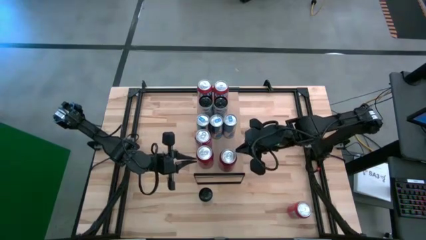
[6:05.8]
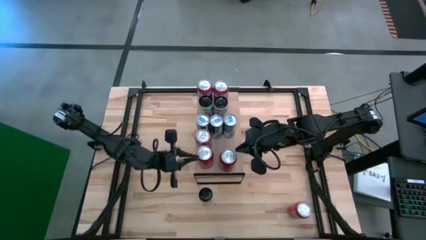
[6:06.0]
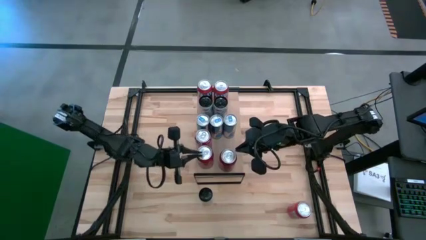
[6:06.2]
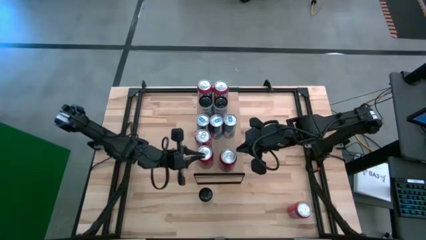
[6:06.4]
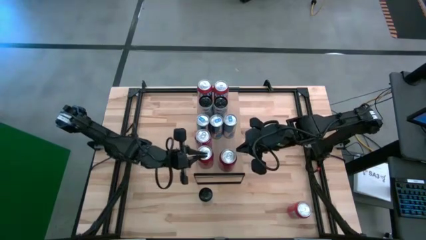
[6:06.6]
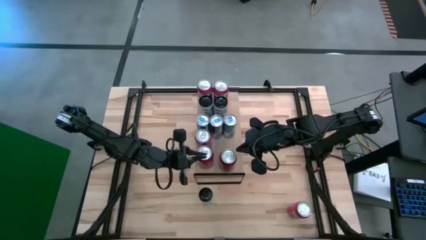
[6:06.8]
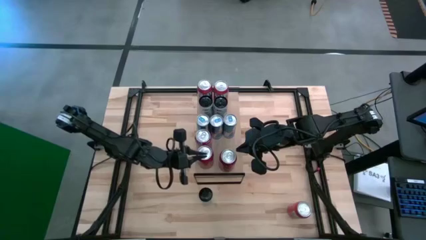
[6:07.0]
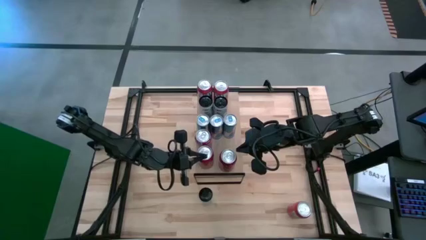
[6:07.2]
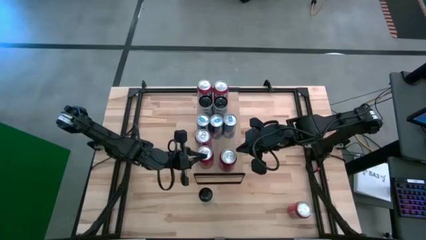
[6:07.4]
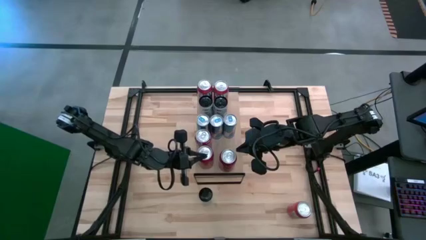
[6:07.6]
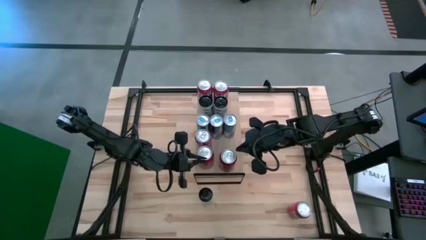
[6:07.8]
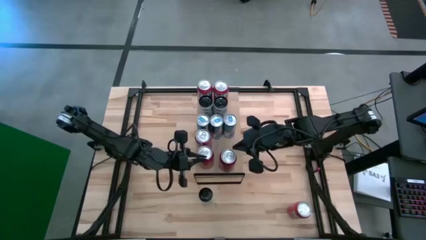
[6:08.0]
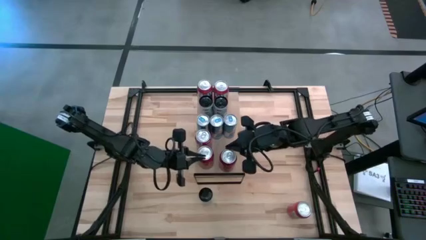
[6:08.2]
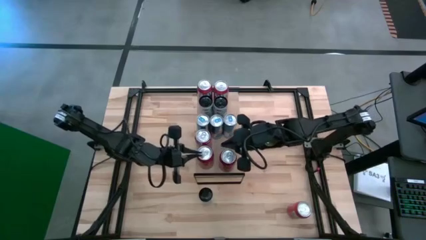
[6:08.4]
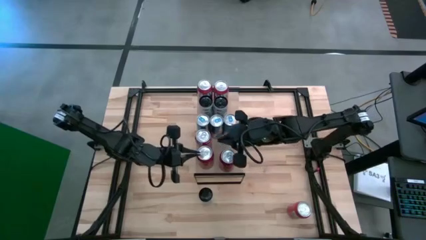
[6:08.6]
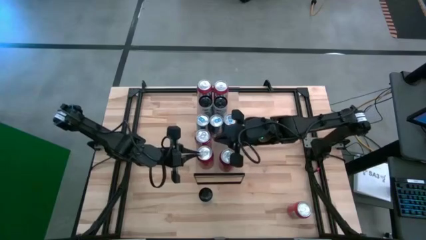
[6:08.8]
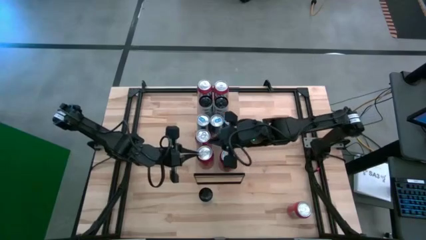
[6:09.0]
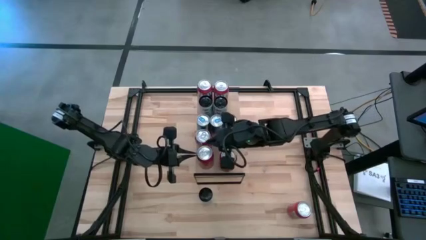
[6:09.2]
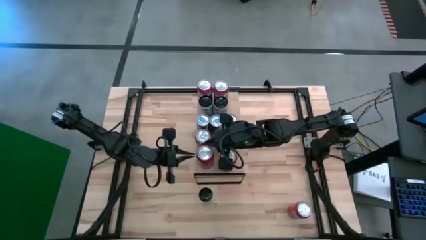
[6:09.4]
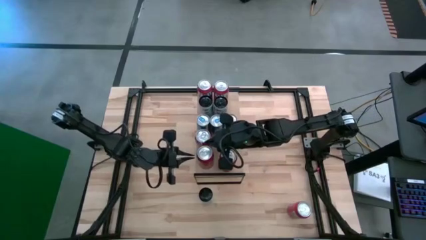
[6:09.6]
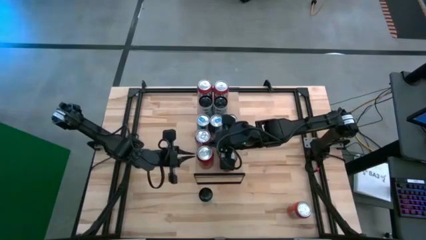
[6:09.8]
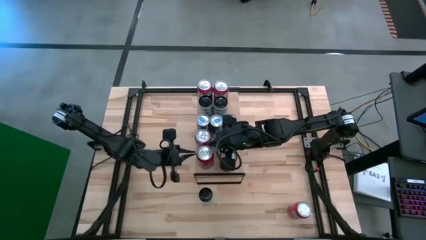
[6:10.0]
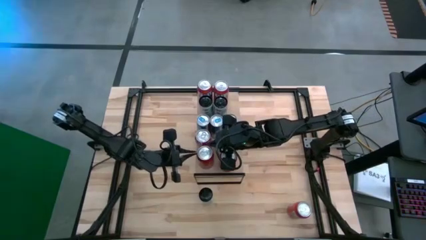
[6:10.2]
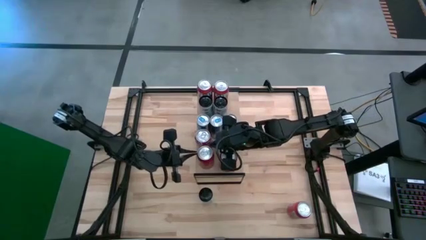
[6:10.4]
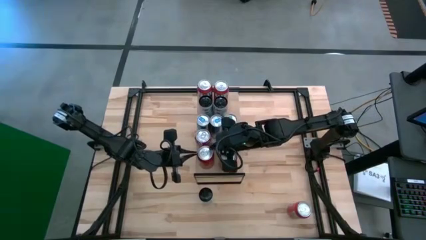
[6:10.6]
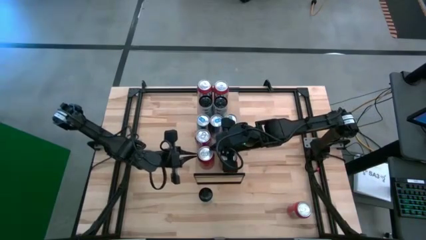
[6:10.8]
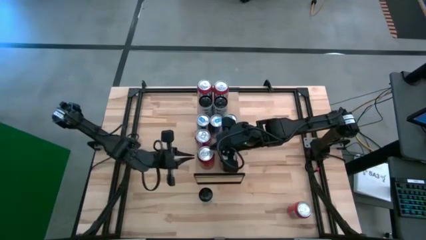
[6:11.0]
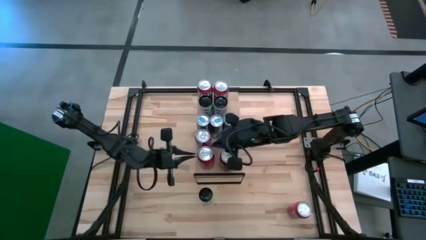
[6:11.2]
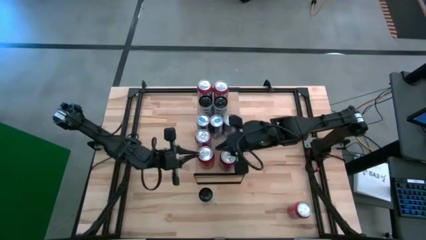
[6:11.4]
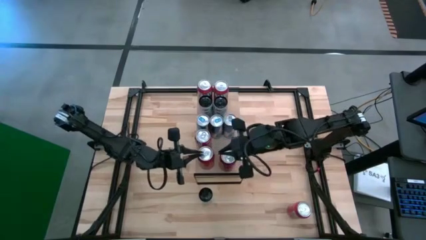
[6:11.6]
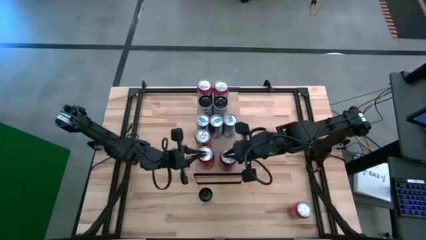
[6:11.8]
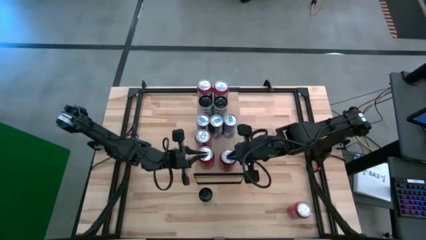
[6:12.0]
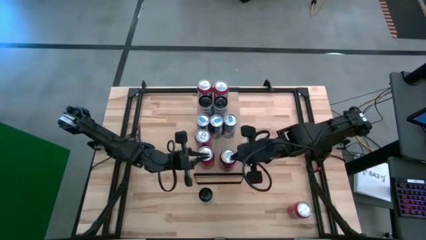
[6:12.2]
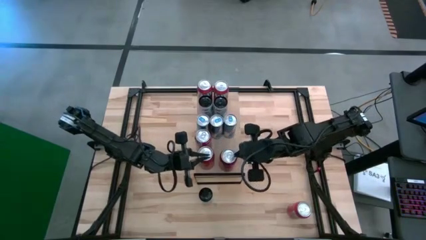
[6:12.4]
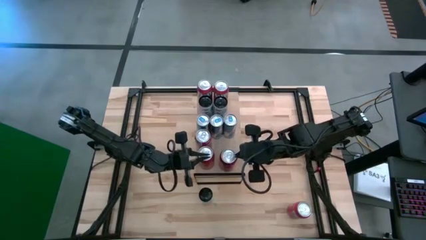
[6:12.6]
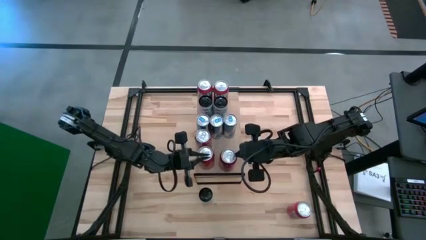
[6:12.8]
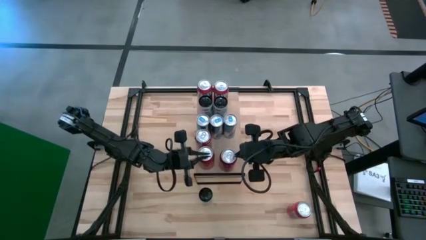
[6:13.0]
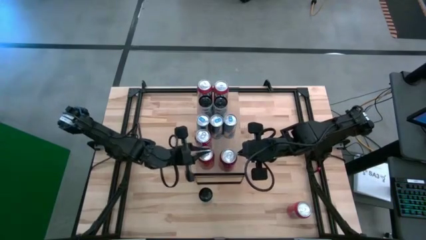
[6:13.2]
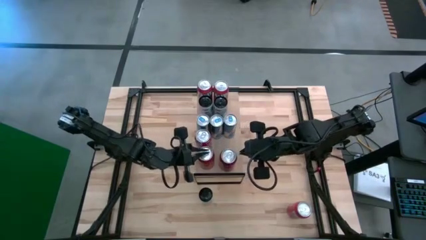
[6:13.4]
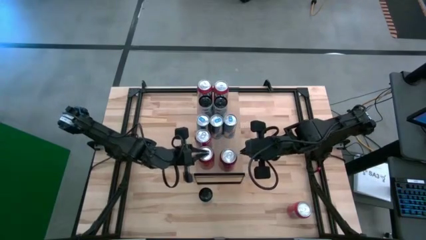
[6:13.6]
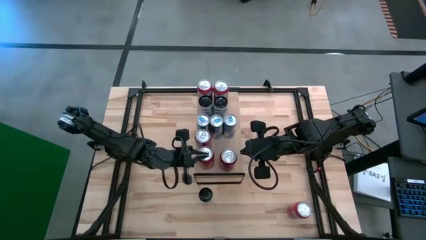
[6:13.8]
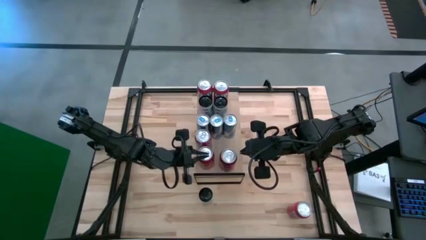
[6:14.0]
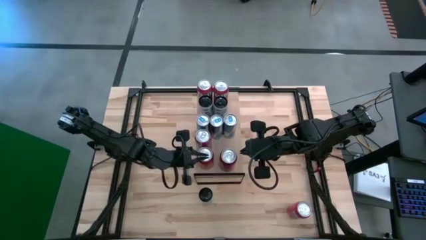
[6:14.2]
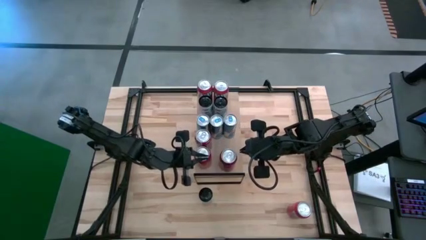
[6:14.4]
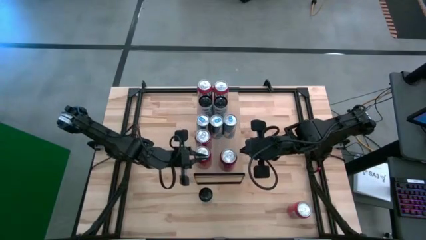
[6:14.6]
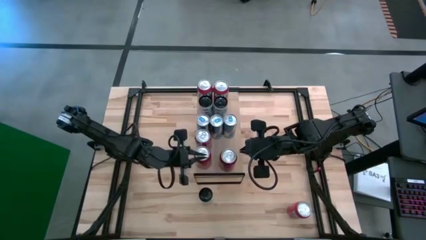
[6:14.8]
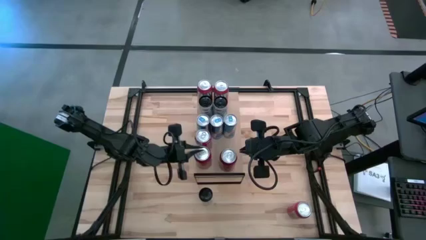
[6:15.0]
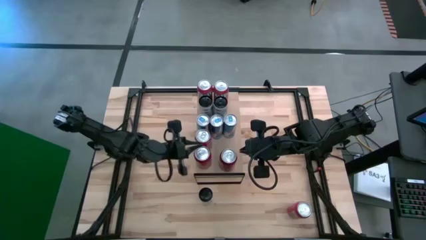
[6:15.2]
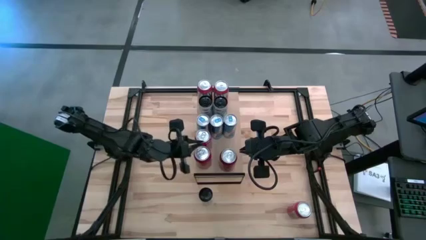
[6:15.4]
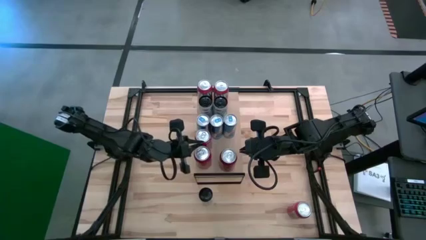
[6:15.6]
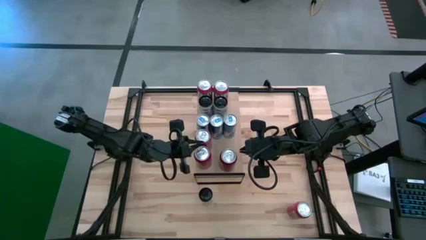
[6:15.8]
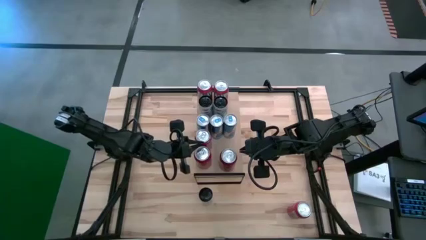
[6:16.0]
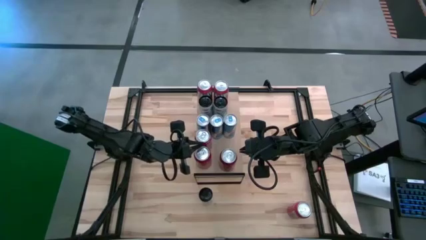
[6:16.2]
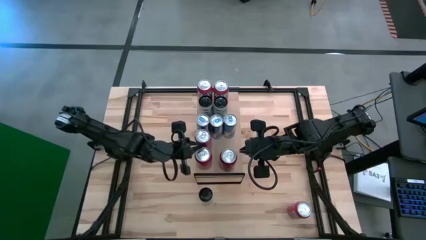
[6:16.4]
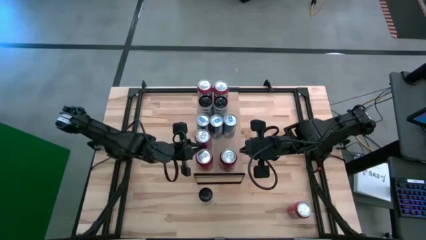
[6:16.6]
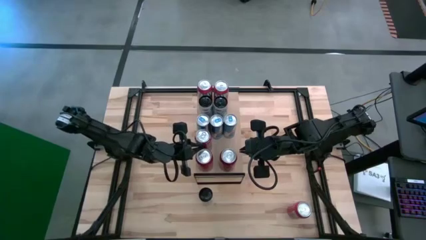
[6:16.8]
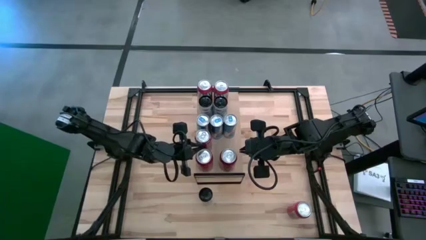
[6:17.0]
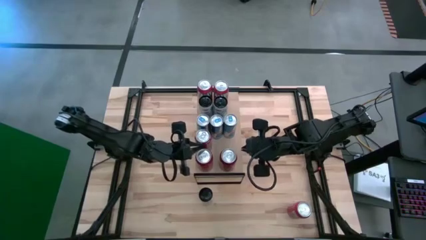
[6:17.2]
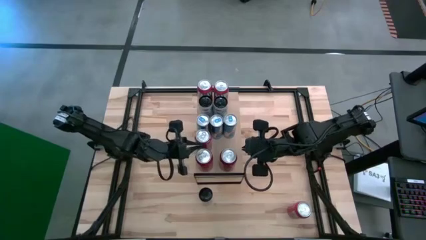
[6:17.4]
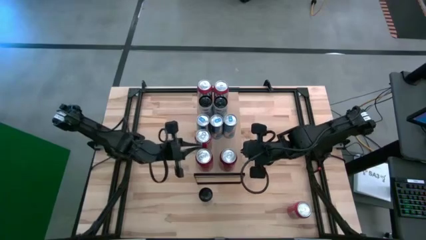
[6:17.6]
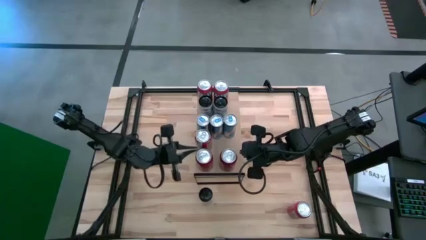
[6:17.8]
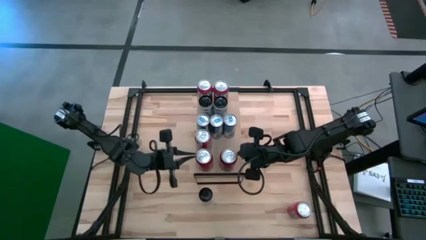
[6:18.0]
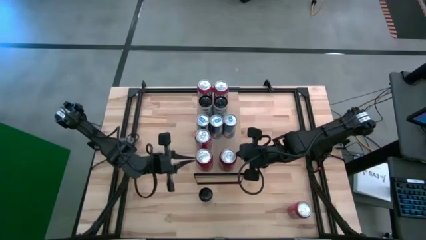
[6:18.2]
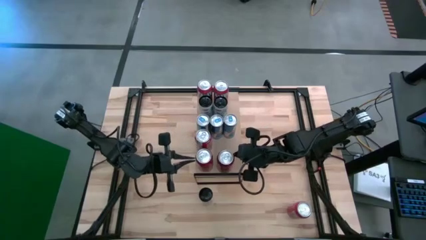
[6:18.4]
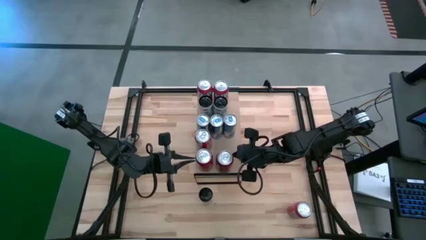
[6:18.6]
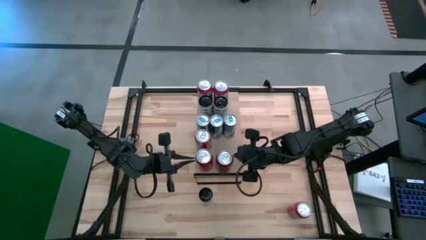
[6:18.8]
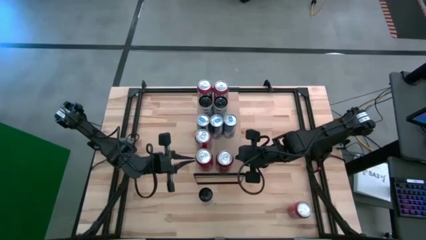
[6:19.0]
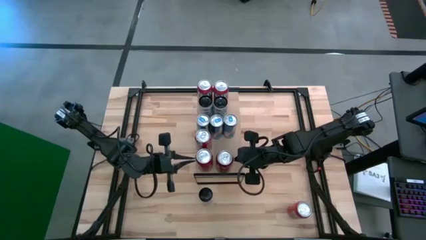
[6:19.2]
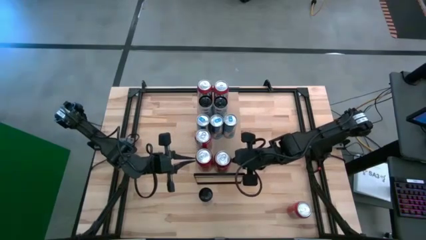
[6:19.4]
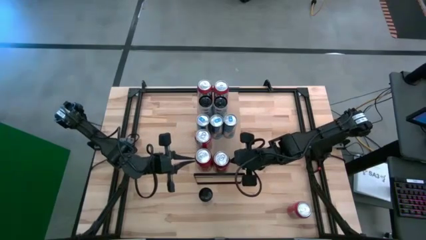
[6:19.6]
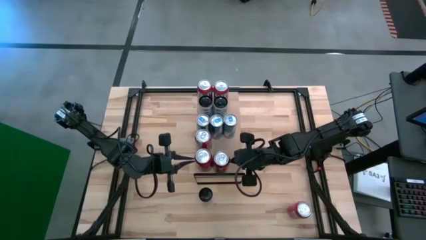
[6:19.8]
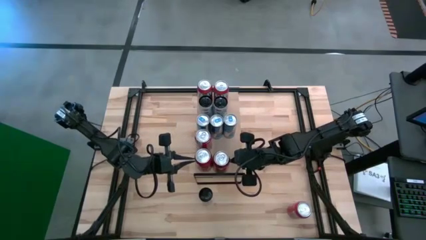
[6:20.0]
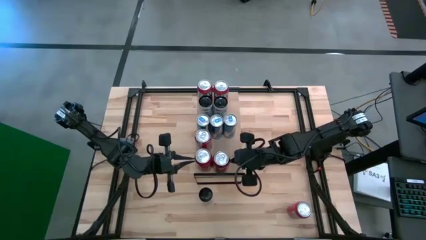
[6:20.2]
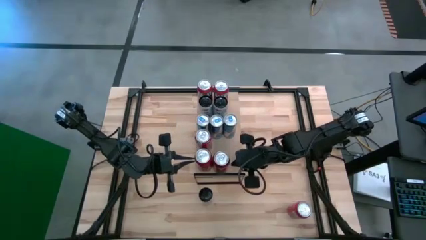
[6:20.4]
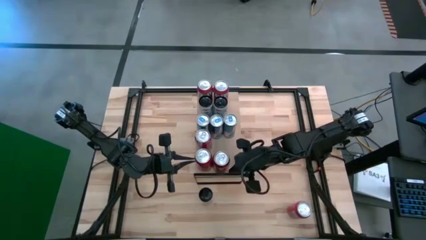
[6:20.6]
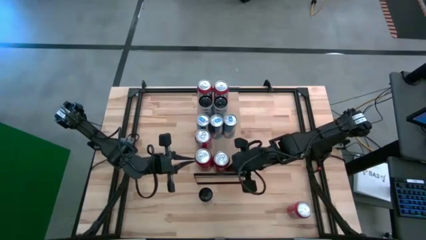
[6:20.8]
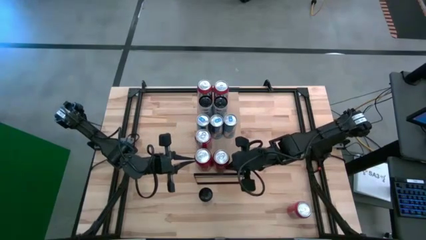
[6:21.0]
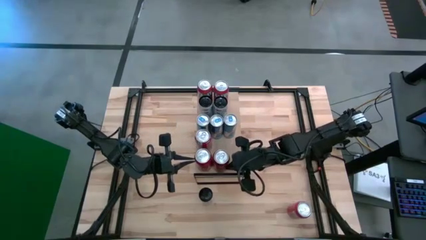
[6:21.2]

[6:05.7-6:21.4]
Task: Place canned beverage on shelf
Adjust the red black soda cans
